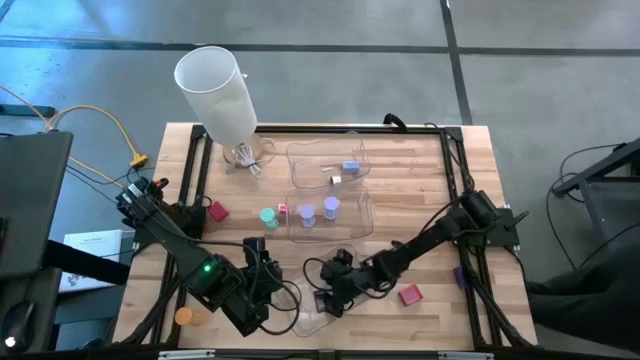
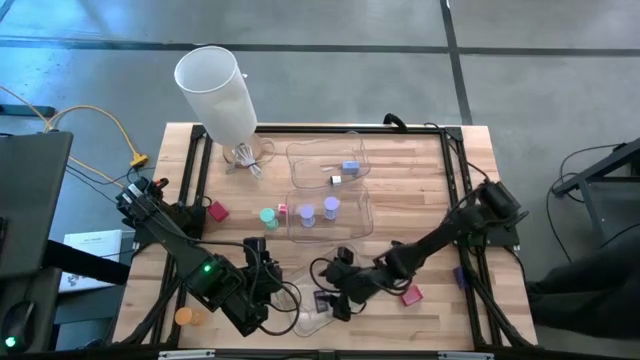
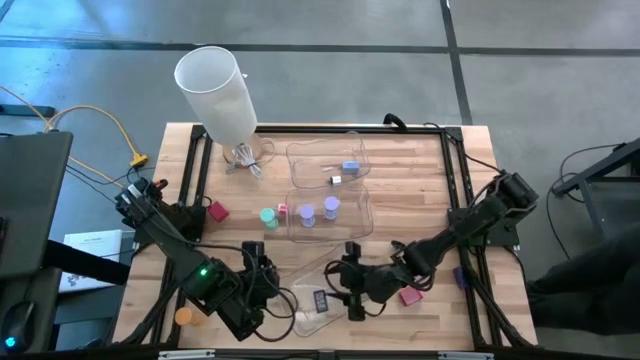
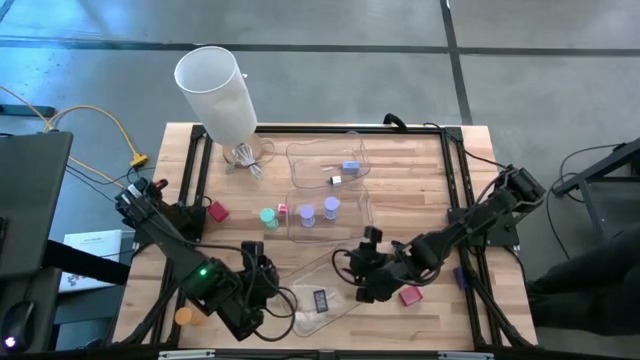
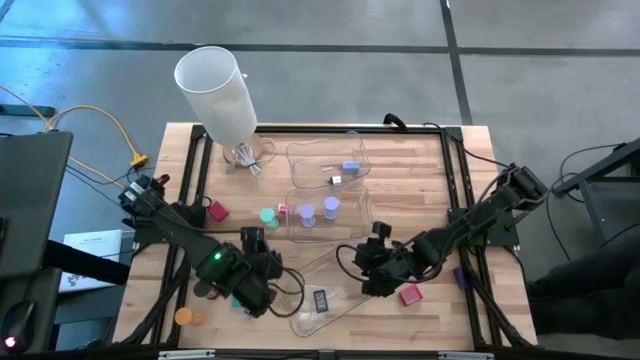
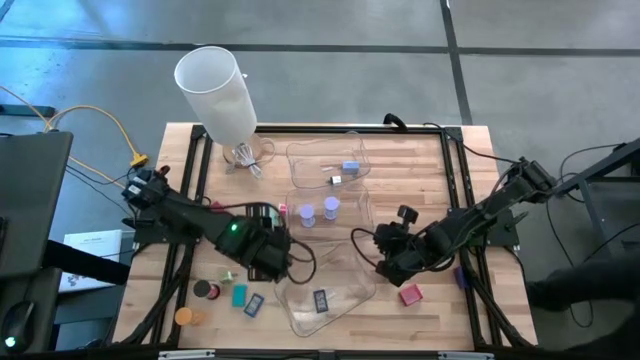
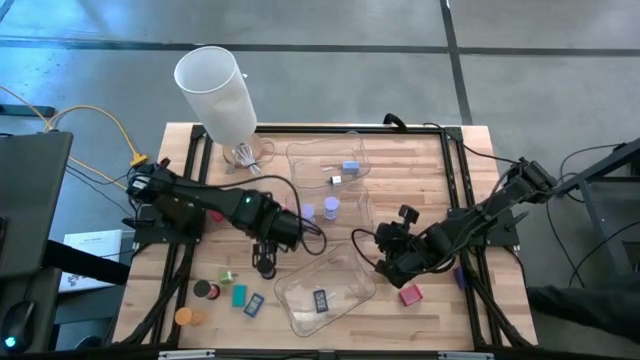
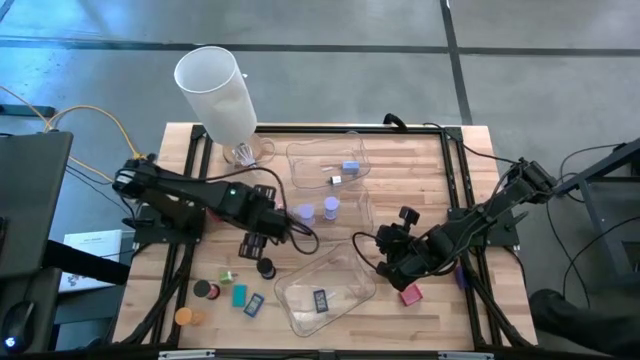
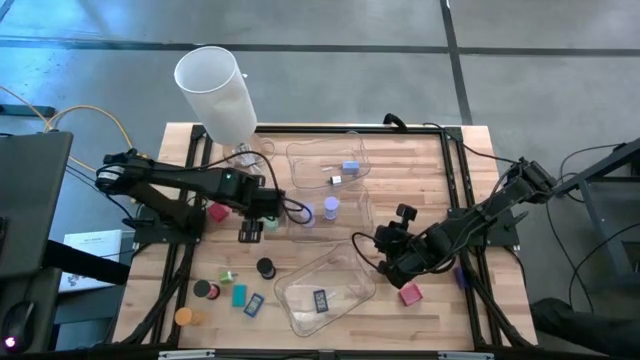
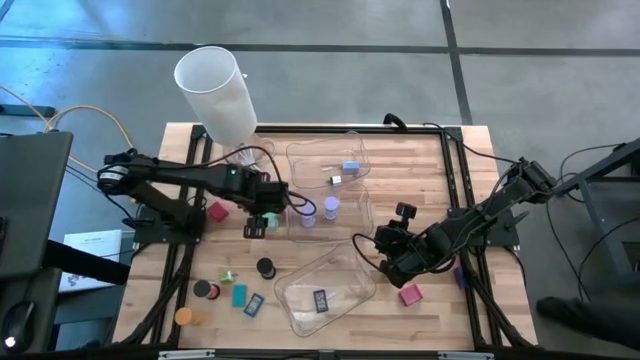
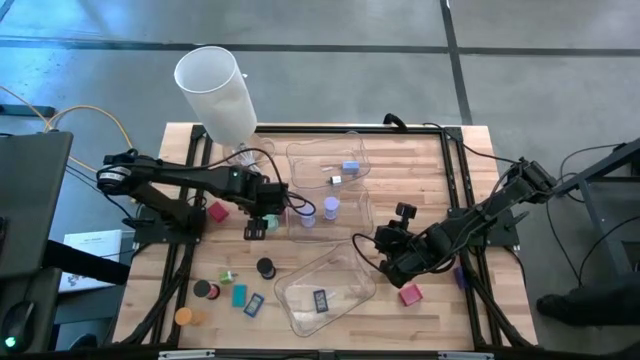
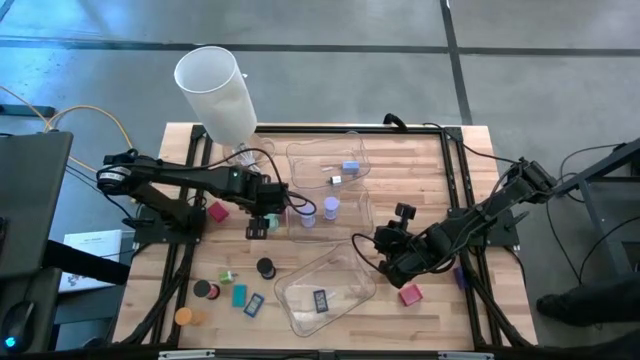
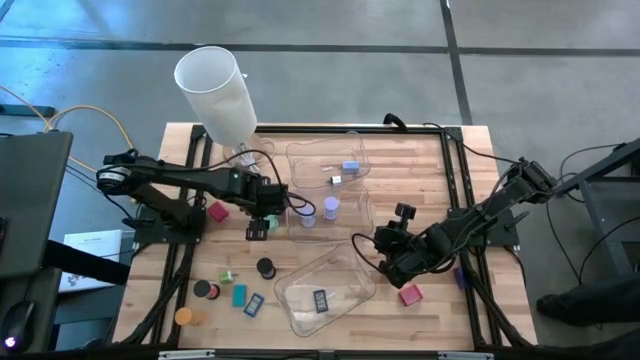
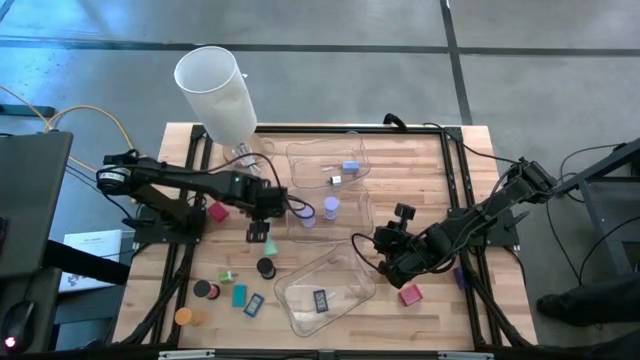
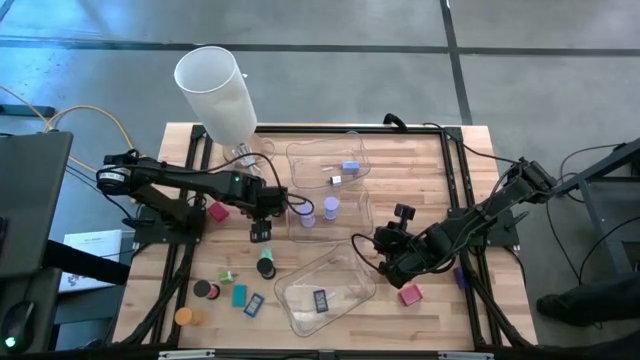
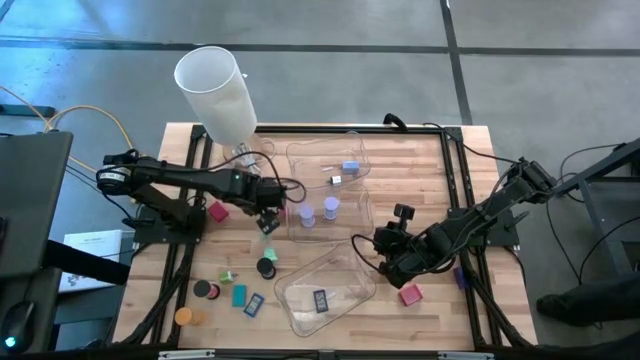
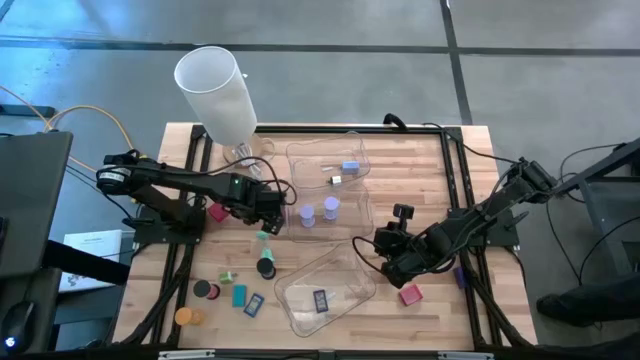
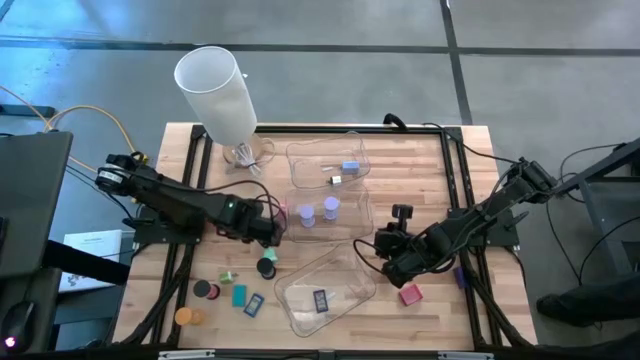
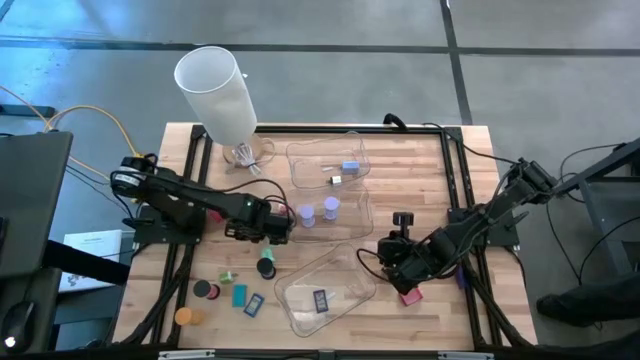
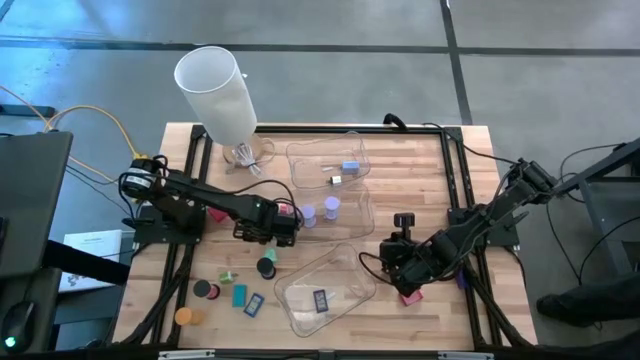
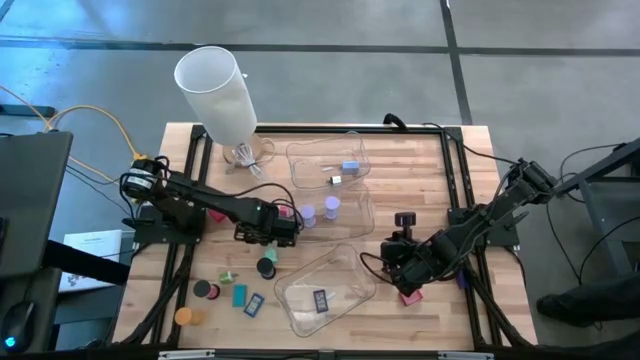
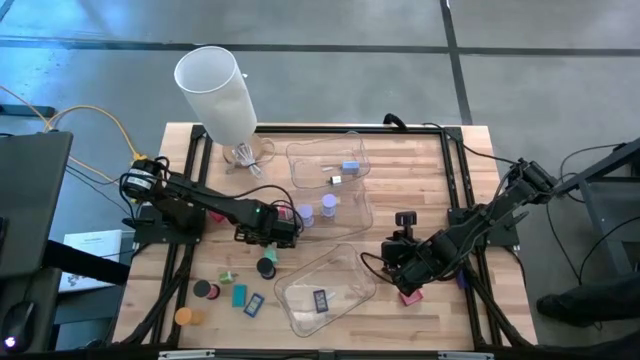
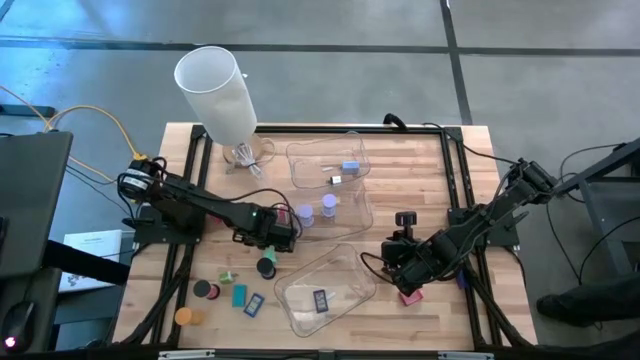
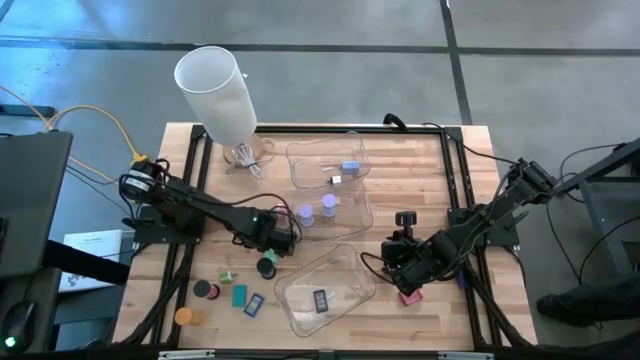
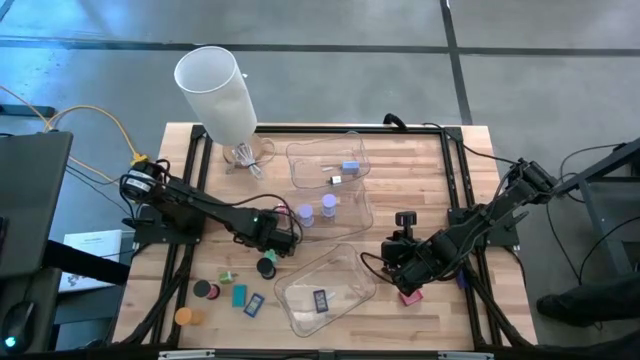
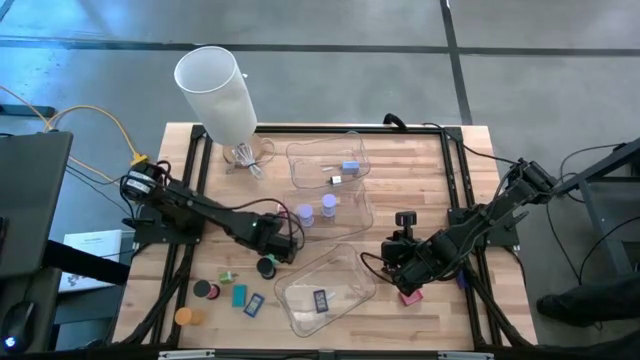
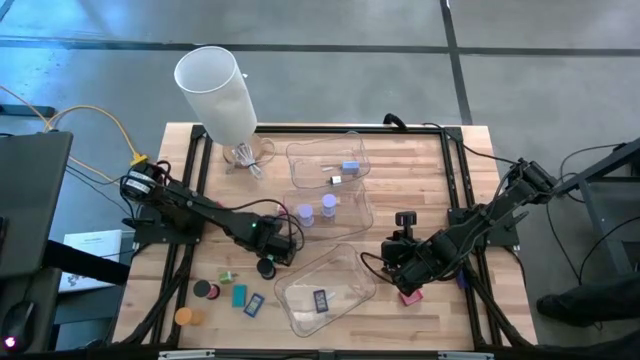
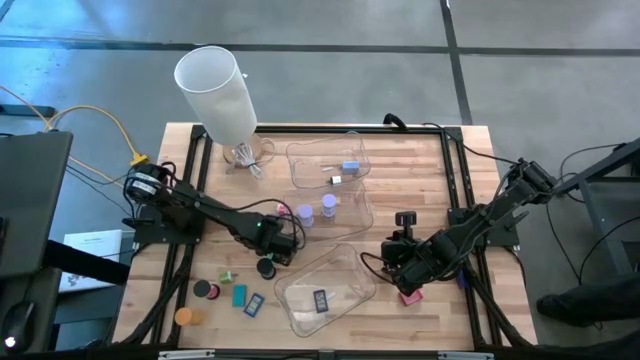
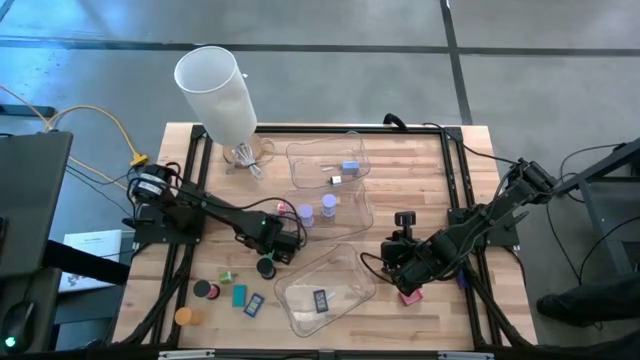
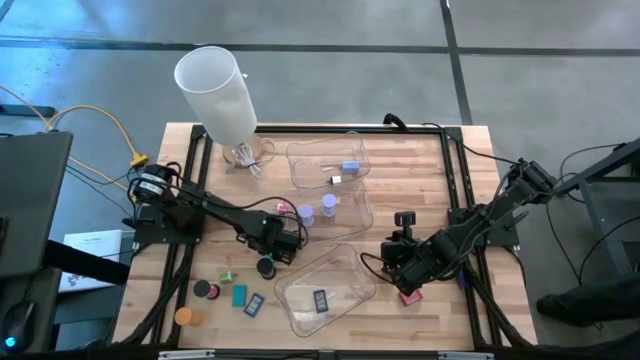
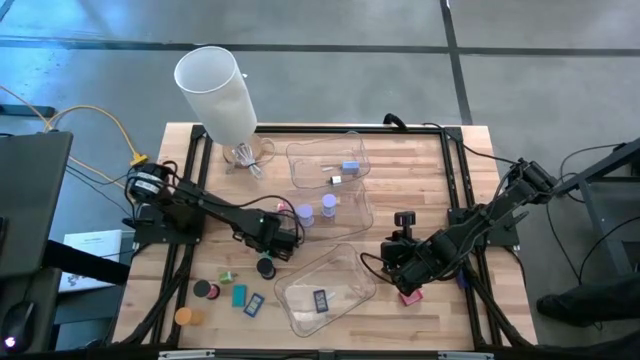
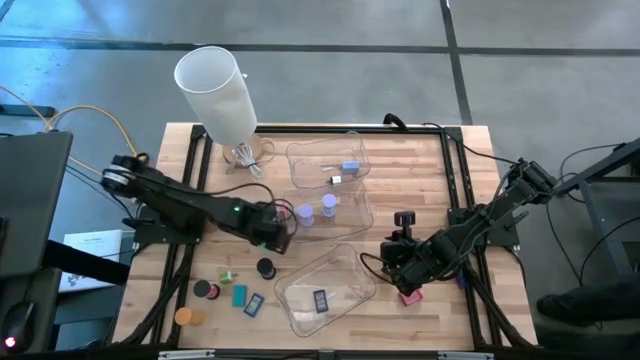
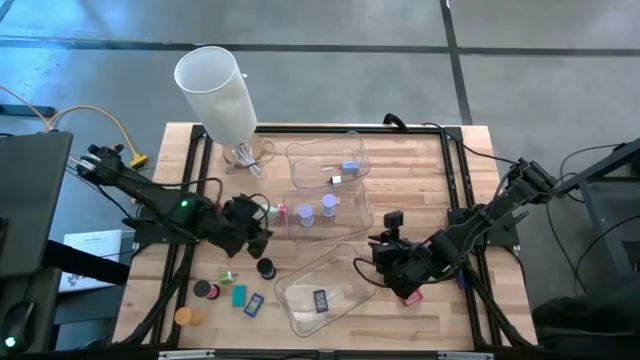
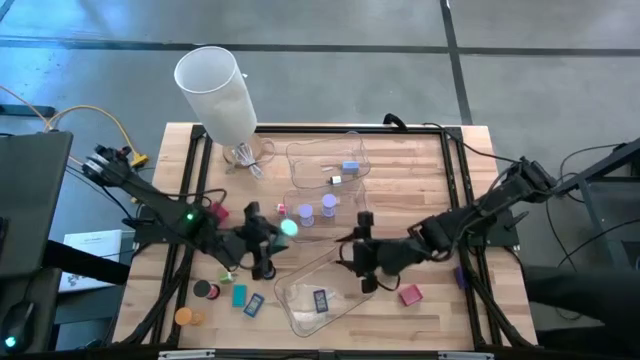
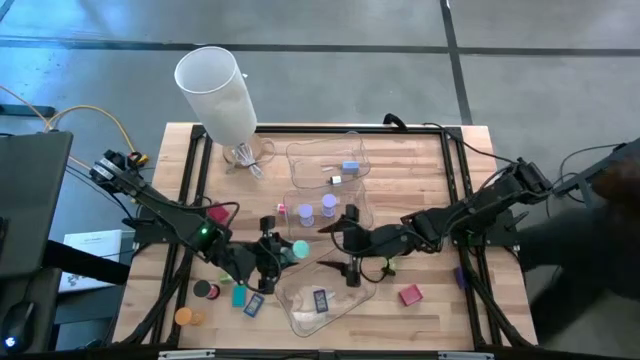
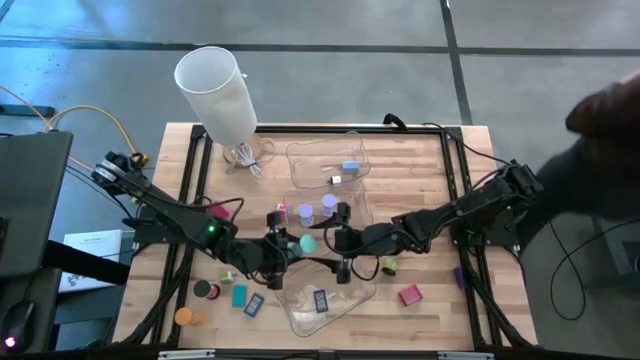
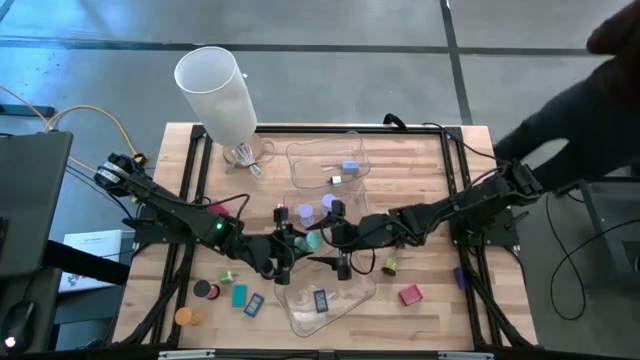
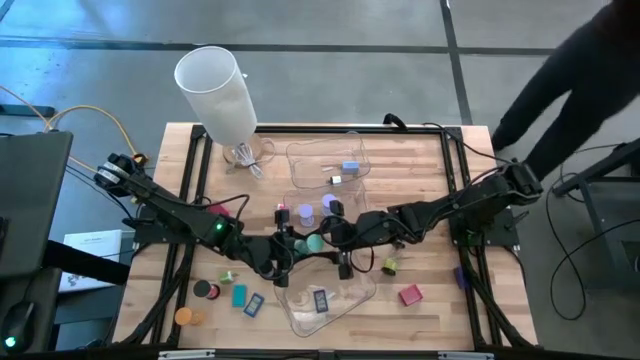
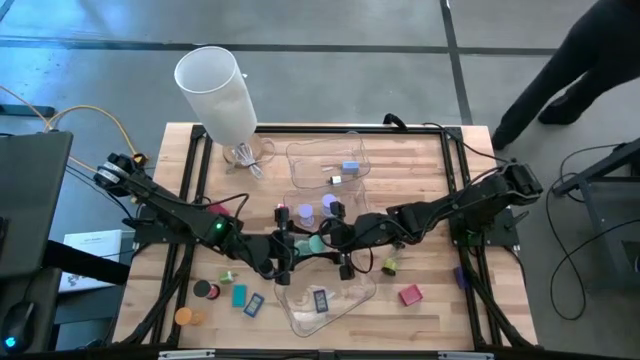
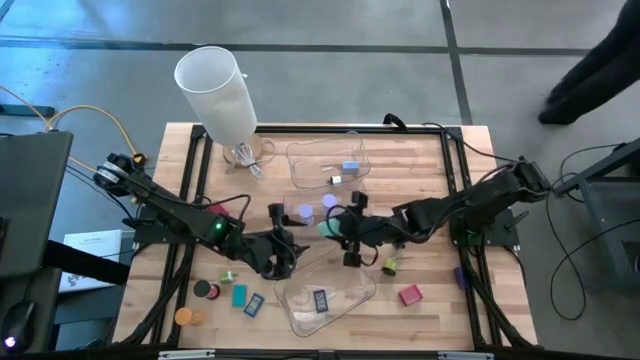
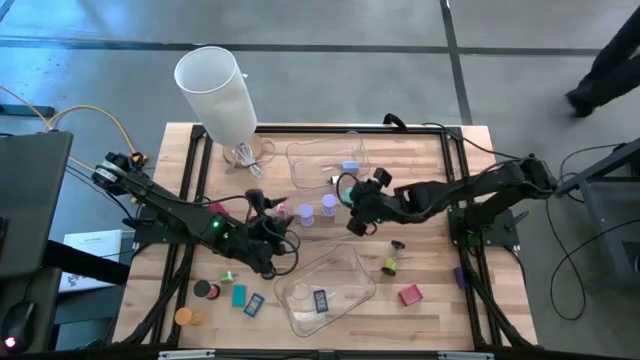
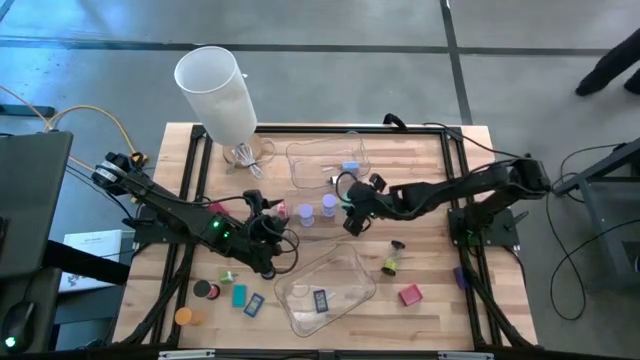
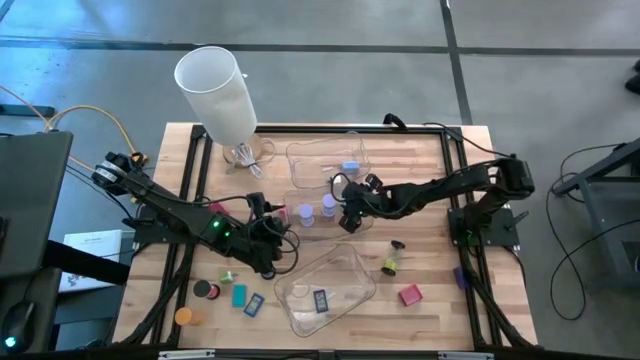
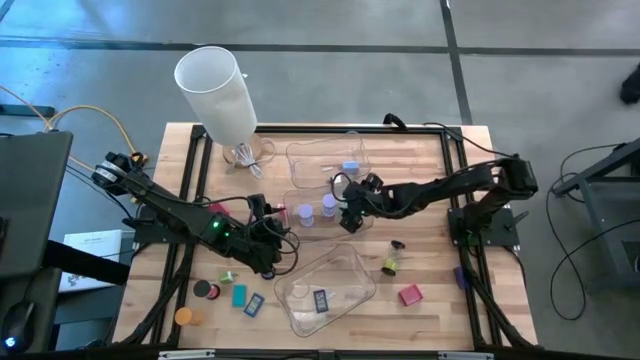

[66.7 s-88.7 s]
Task: Pick & Place Office items
Put the light blue hourglass into the middle transparent bin
